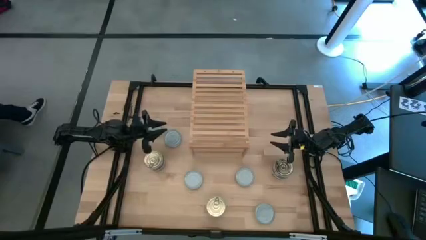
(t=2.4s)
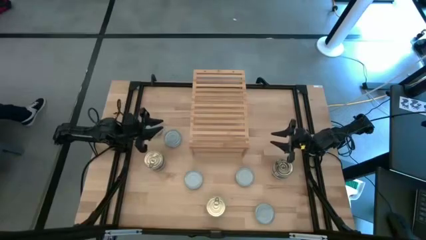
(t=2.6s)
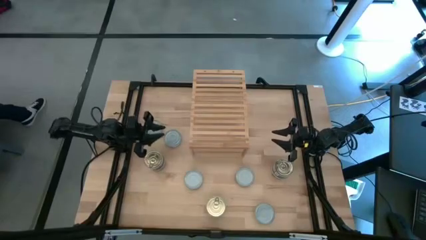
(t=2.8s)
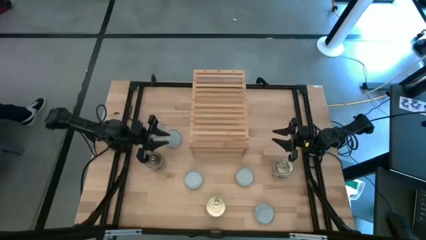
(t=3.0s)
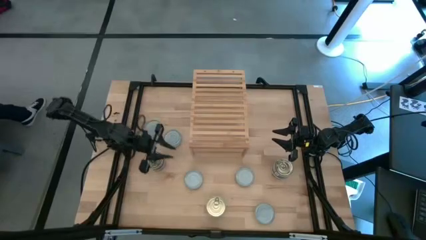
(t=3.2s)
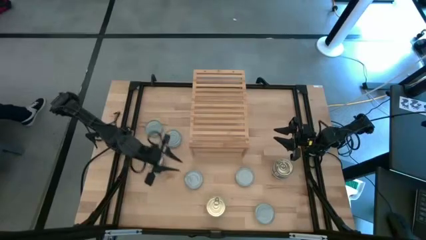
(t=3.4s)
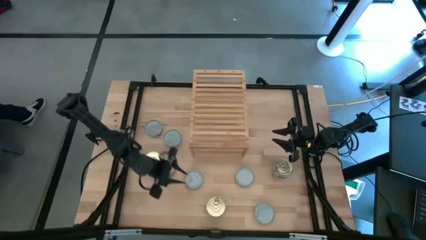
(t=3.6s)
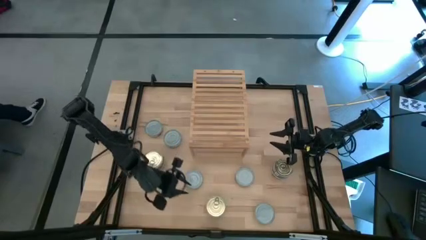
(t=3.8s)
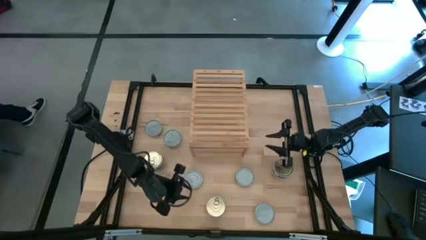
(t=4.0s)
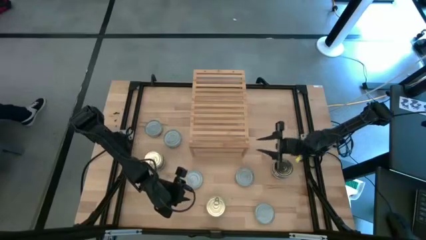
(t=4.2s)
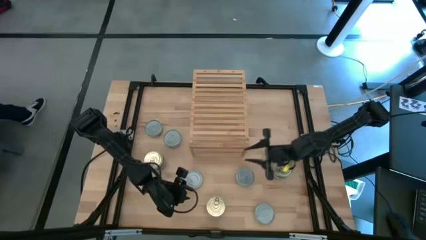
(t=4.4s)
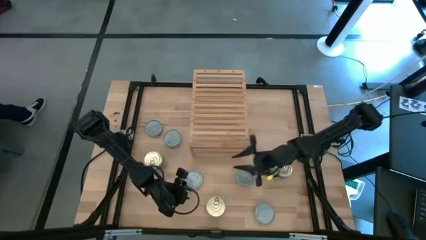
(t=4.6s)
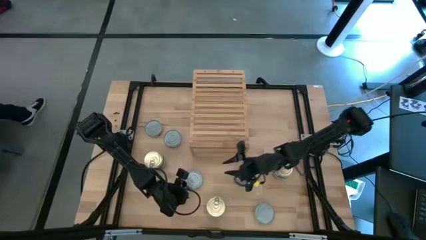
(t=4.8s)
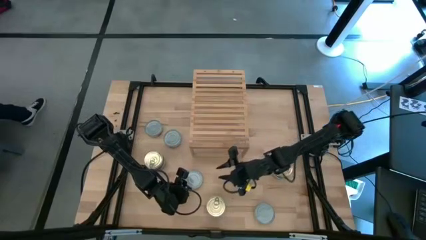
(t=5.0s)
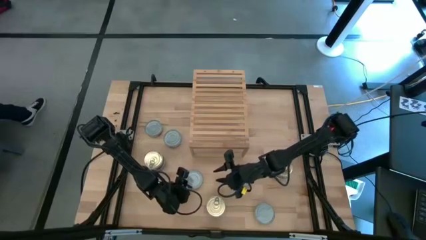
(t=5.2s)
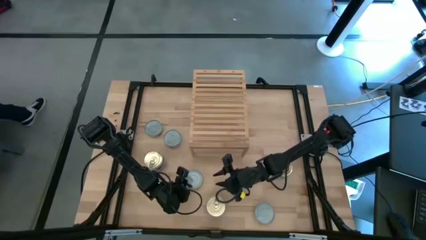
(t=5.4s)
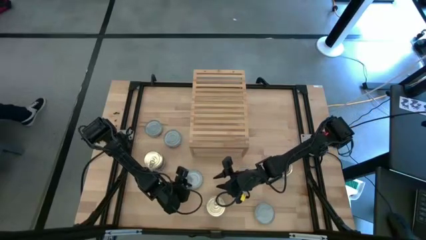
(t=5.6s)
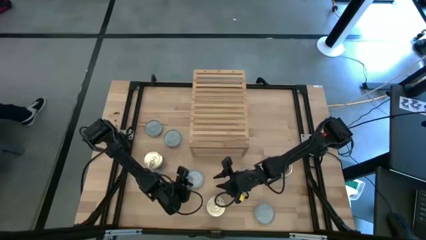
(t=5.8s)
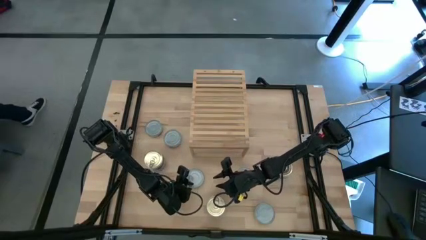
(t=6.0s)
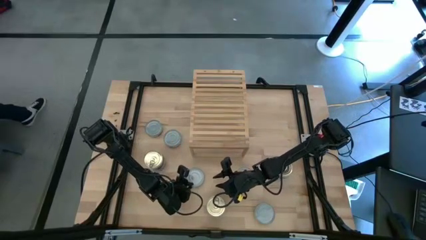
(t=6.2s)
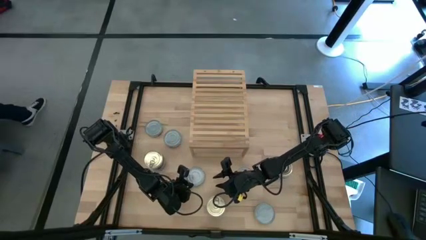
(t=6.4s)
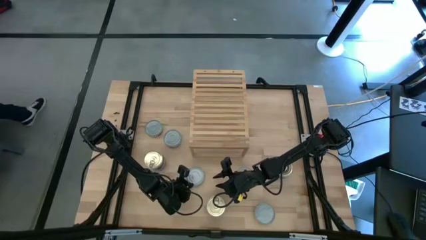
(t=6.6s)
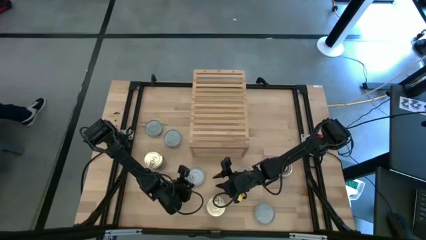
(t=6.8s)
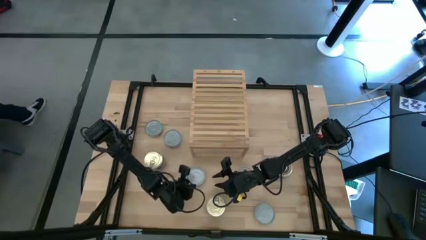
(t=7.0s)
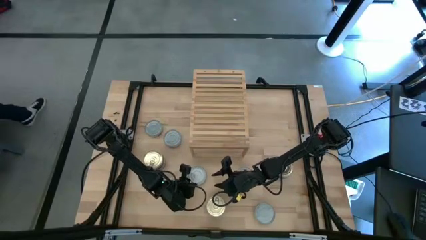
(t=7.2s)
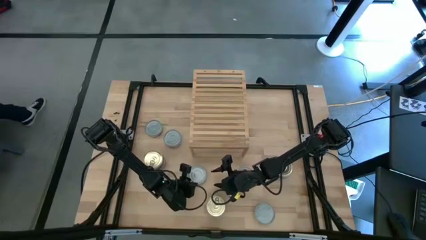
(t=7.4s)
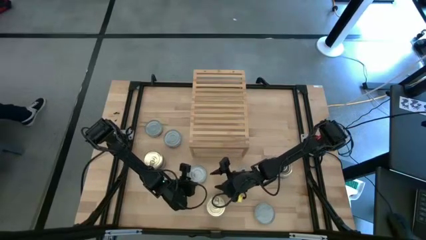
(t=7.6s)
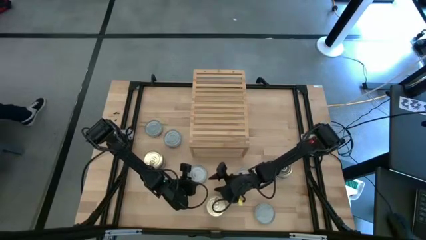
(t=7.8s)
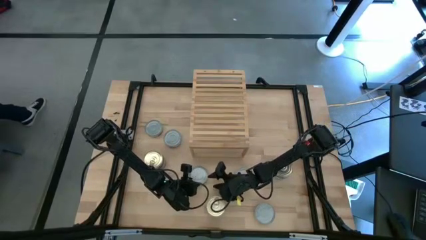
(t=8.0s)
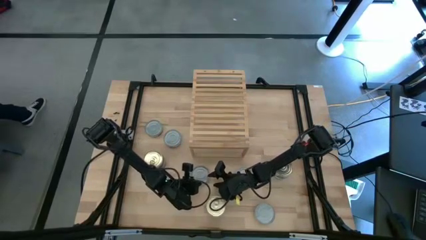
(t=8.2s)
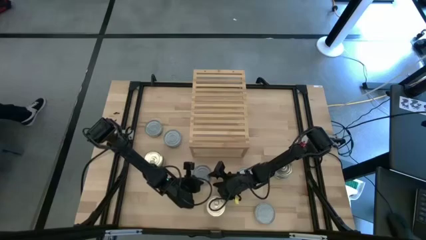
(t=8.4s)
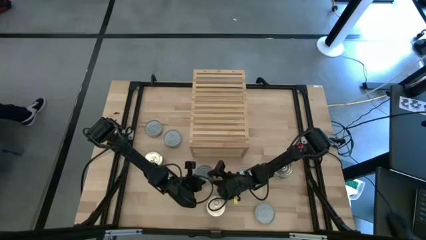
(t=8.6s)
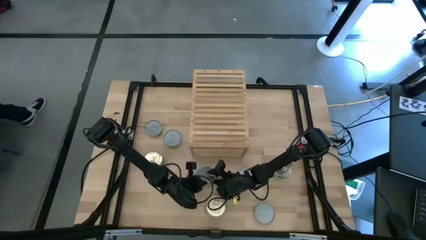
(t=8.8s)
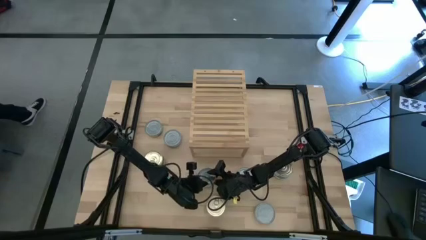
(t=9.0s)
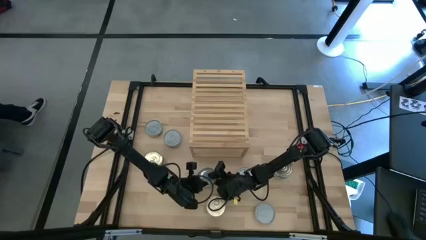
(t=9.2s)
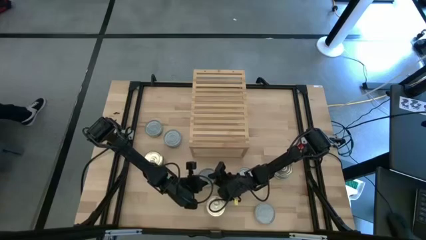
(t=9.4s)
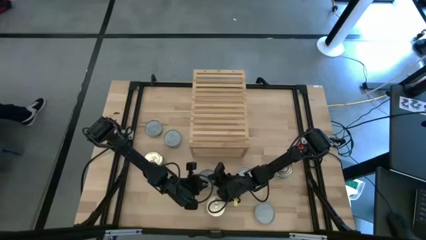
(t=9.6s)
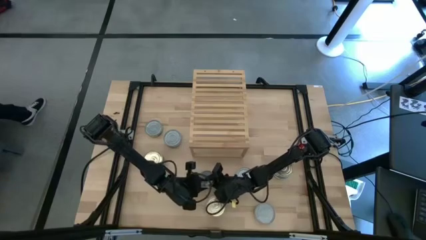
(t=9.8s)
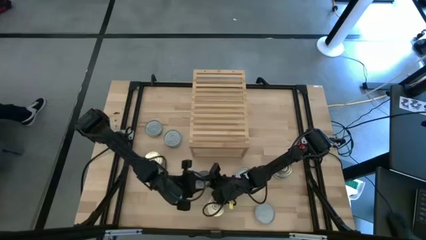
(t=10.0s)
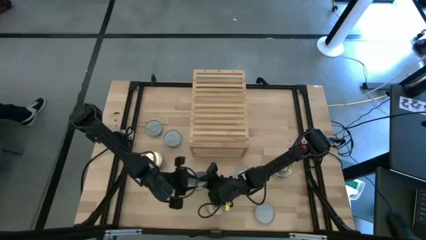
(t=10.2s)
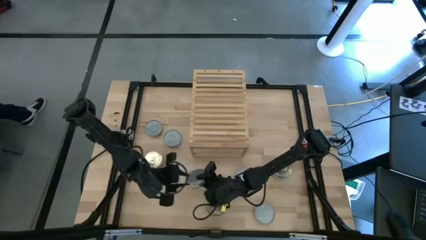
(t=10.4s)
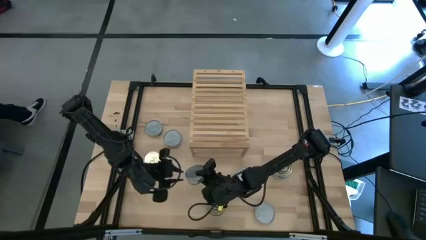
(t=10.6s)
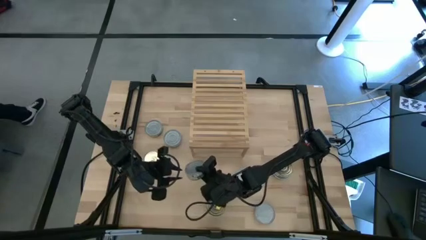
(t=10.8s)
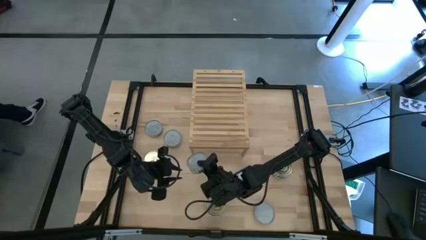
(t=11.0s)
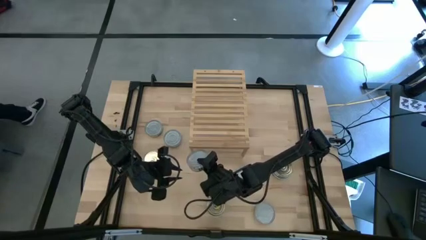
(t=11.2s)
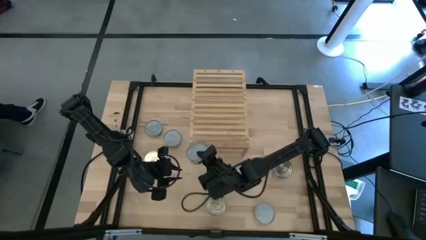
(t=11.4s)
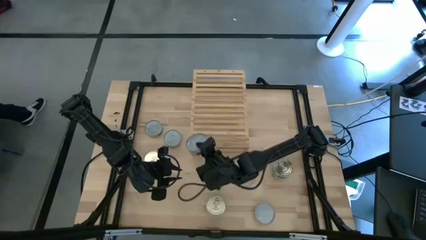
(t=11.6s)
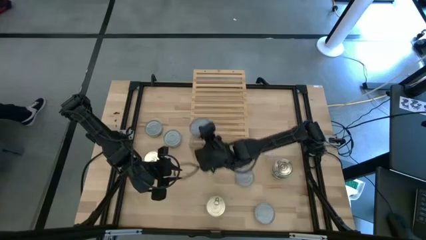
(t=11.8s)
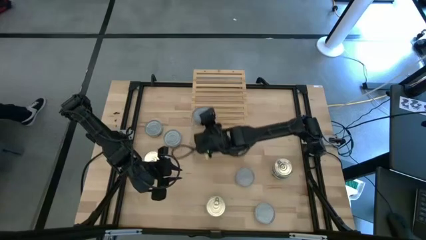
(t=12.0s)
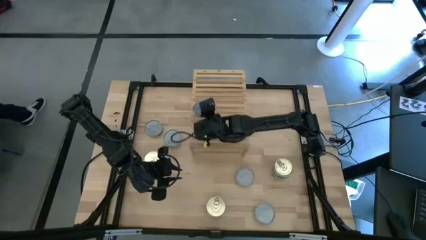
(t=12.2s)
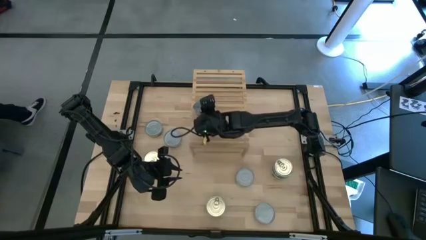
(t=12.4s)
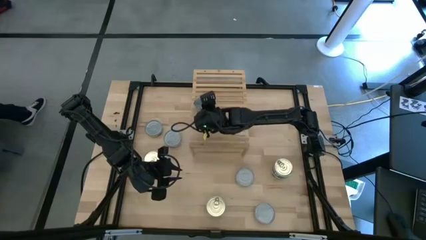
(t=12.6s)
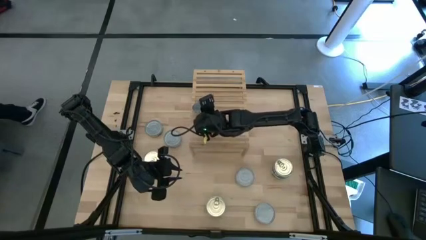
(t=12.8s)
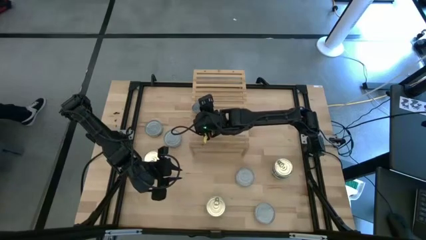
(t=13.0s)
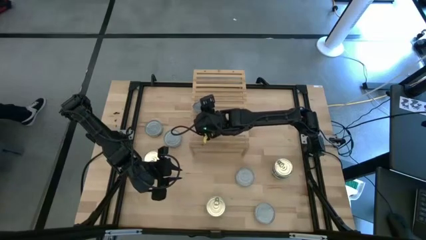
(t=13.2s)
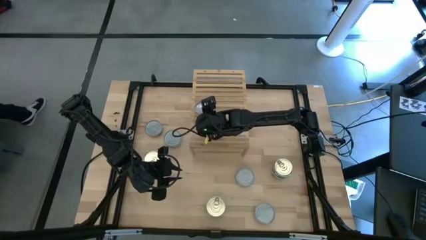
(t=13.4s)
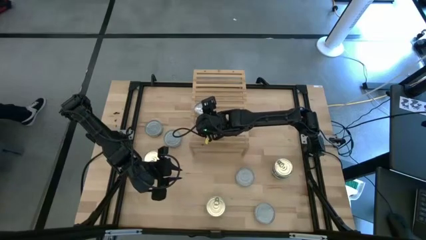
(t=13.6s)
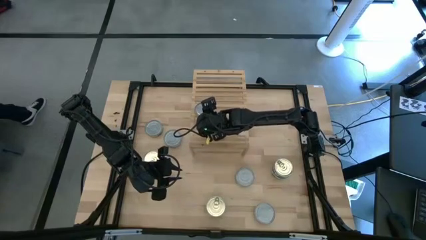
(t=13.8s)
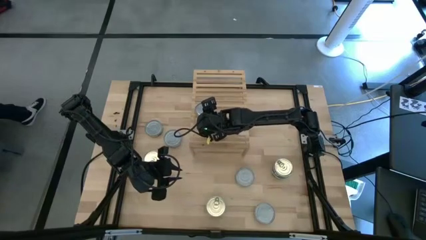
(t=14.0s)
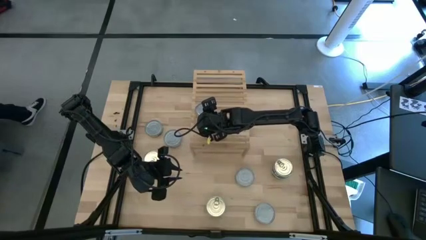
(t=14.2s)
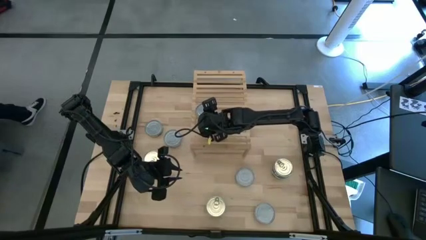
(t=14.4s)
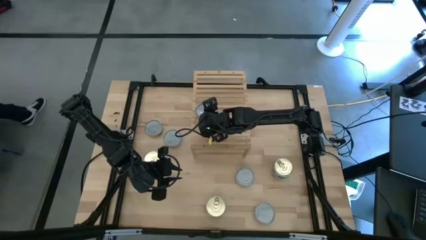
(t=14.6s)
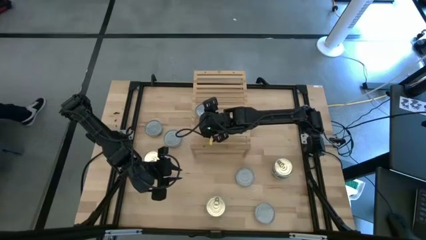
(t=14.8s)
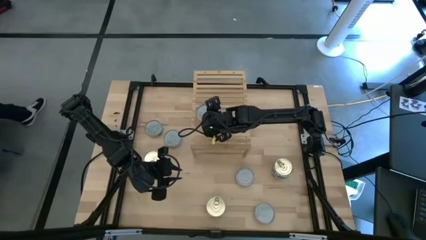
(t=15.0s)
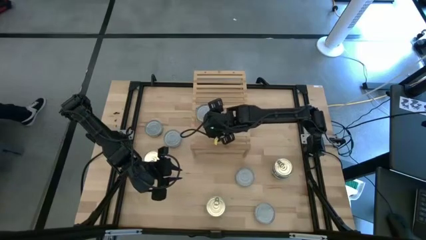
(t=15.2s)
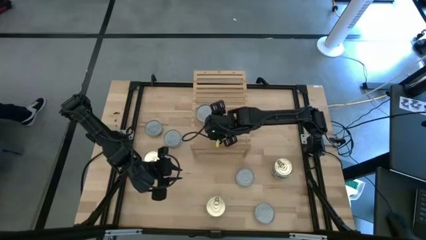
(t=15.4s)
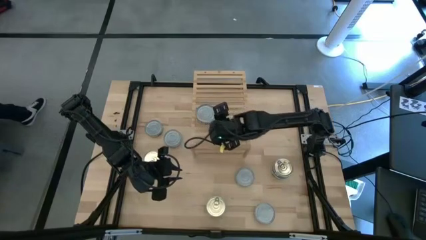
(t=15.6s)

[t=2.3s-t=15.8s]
Task: Stack canned seafood by type on shelf
Put the green tuna can on the shelf
